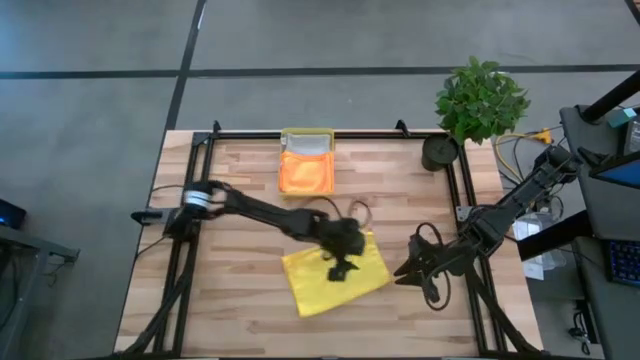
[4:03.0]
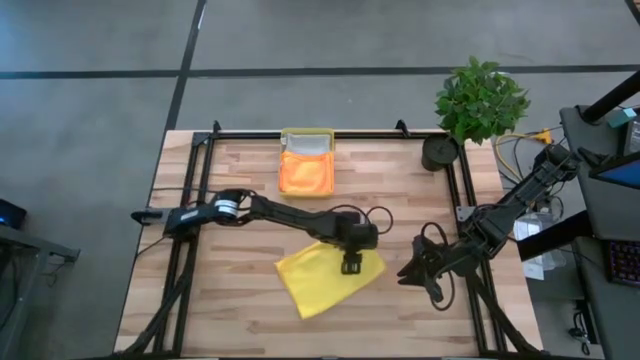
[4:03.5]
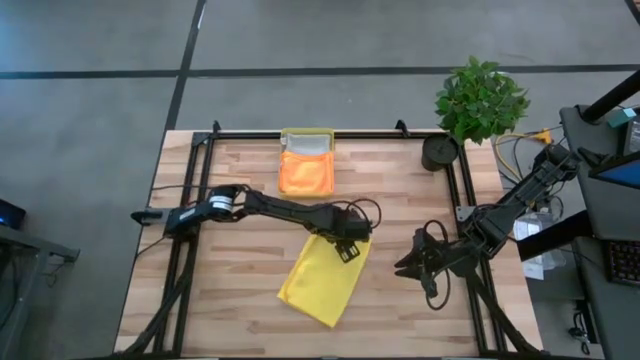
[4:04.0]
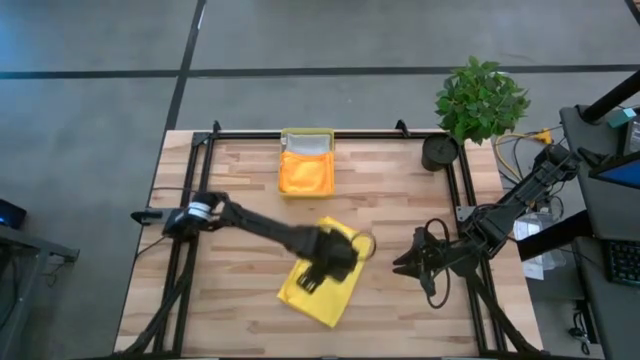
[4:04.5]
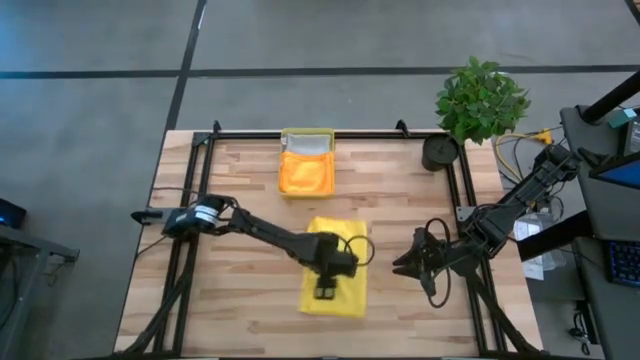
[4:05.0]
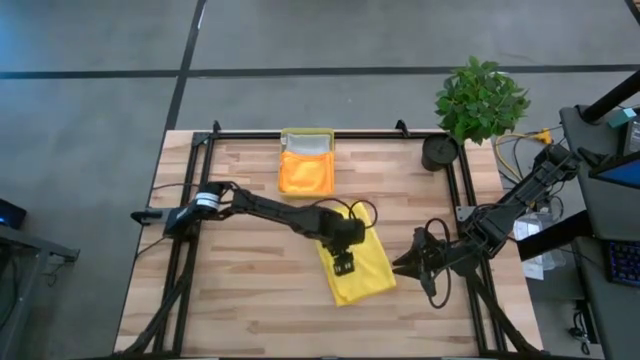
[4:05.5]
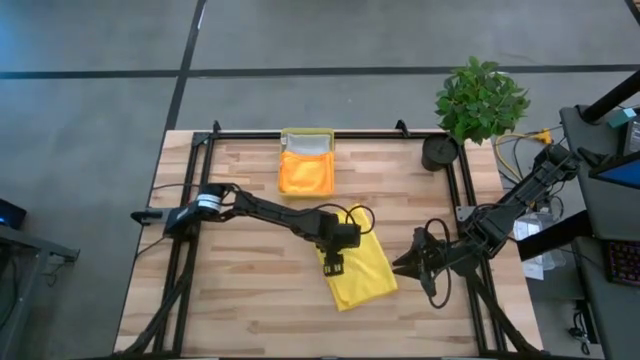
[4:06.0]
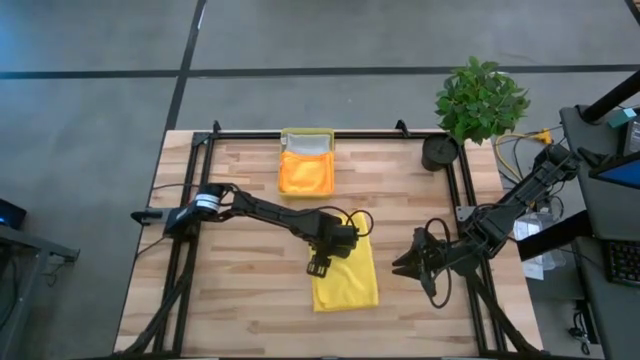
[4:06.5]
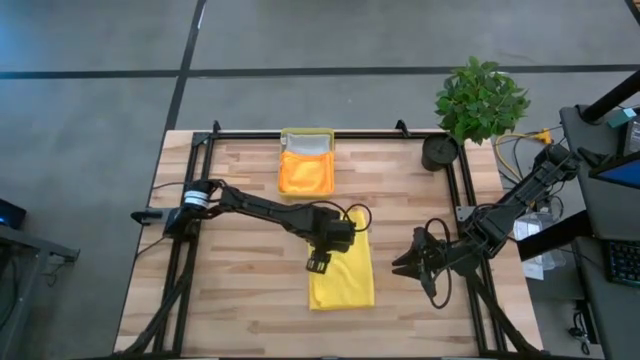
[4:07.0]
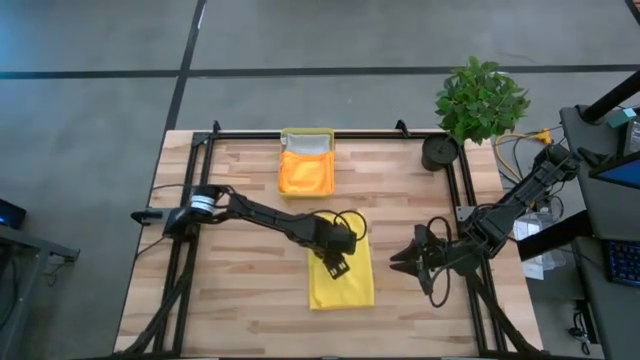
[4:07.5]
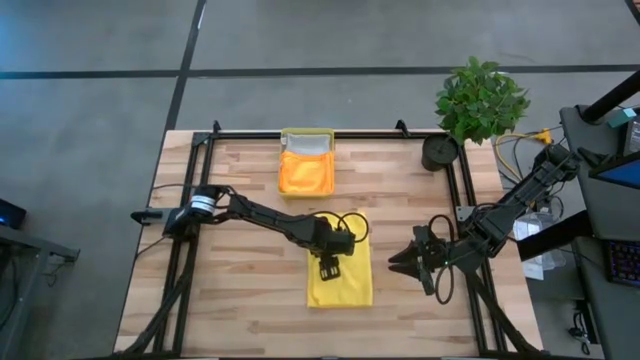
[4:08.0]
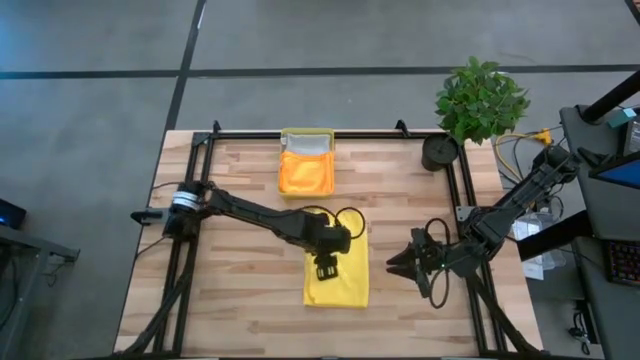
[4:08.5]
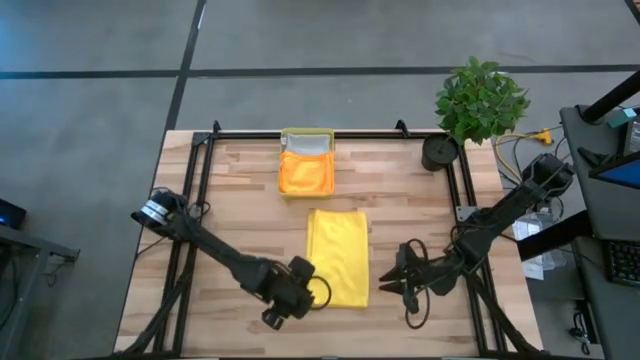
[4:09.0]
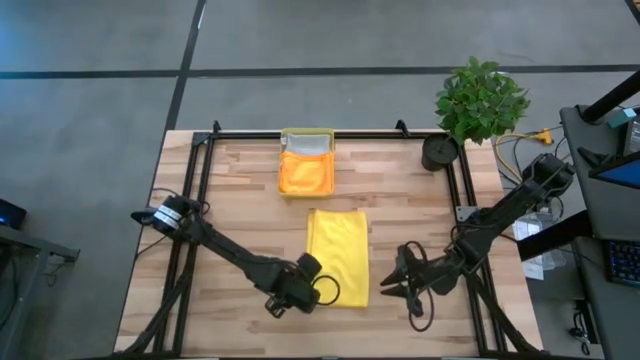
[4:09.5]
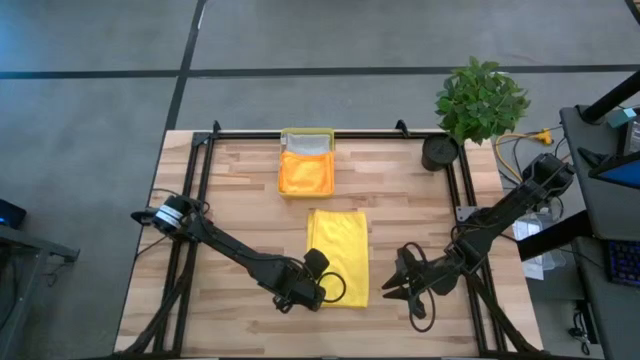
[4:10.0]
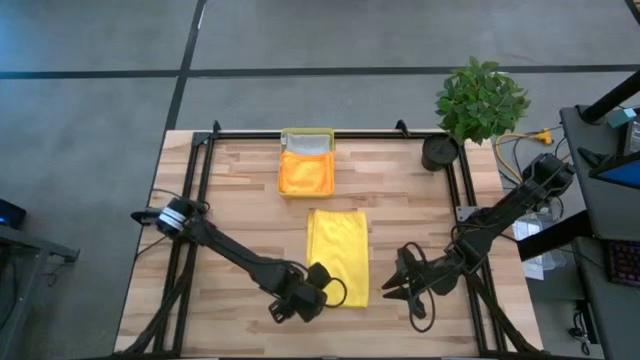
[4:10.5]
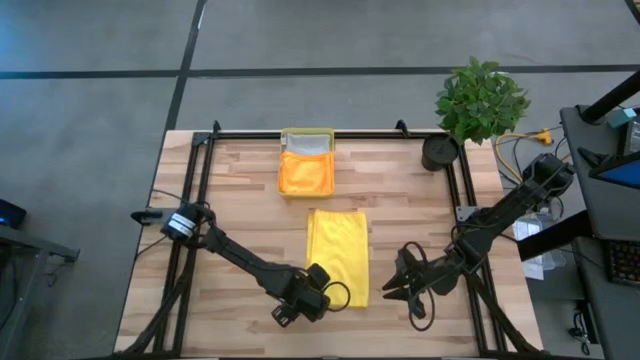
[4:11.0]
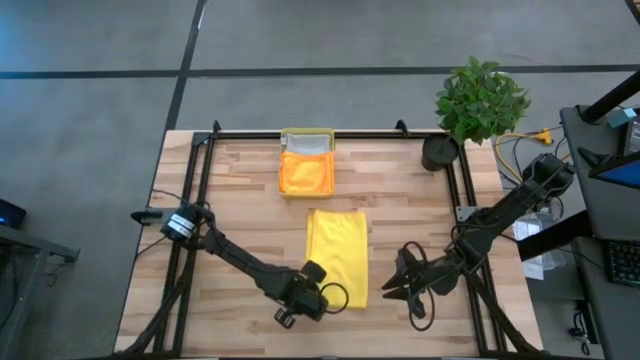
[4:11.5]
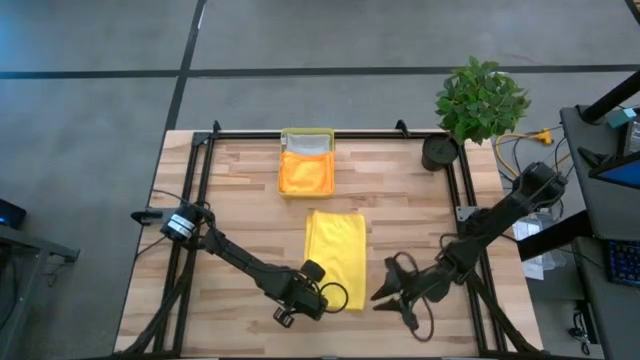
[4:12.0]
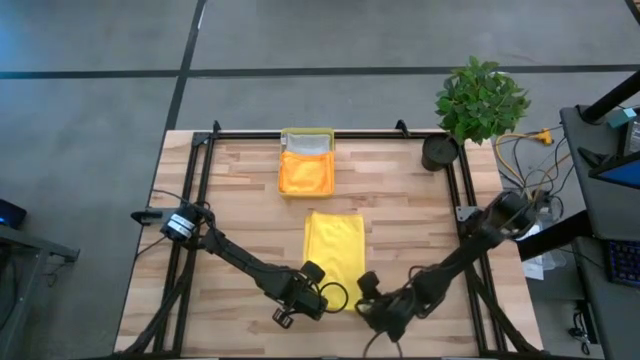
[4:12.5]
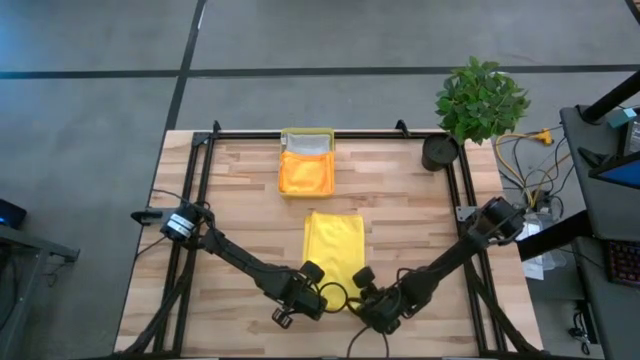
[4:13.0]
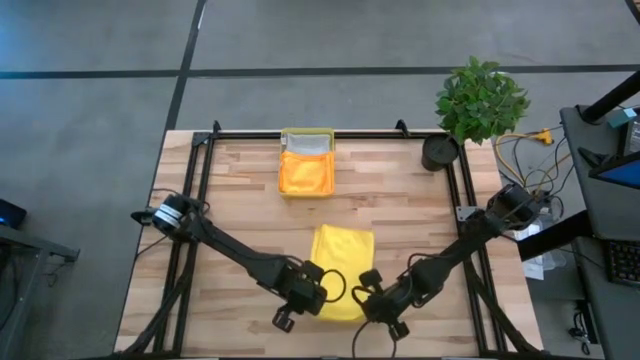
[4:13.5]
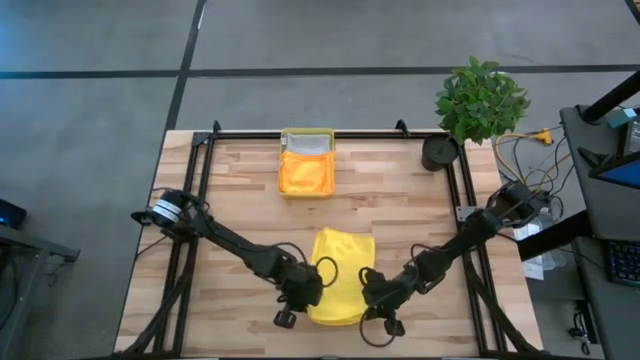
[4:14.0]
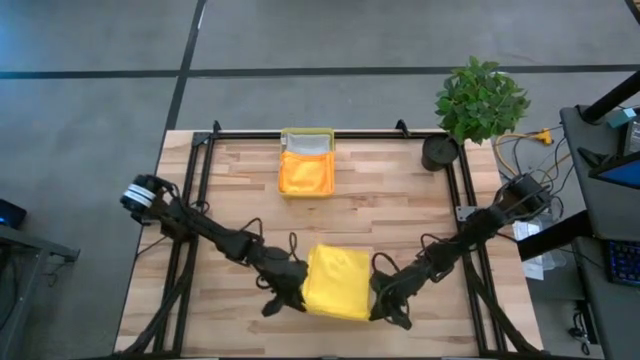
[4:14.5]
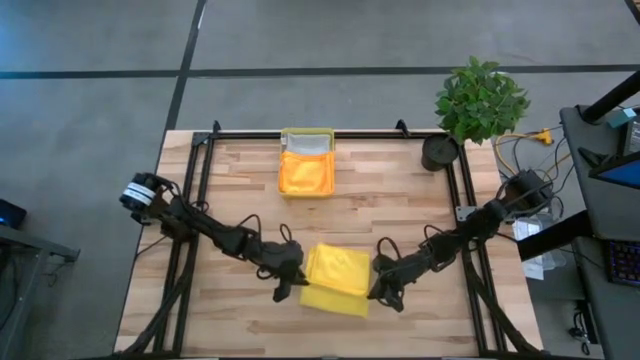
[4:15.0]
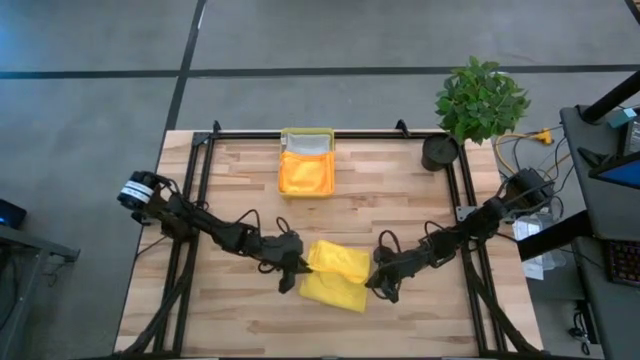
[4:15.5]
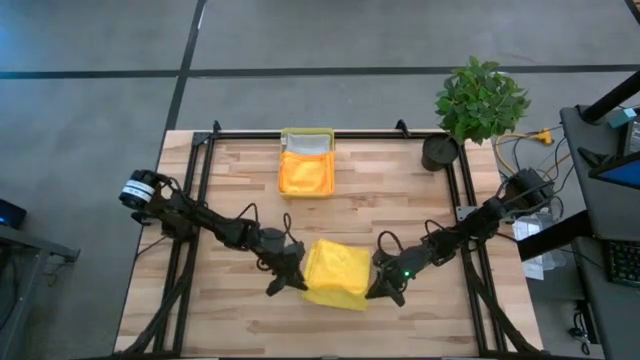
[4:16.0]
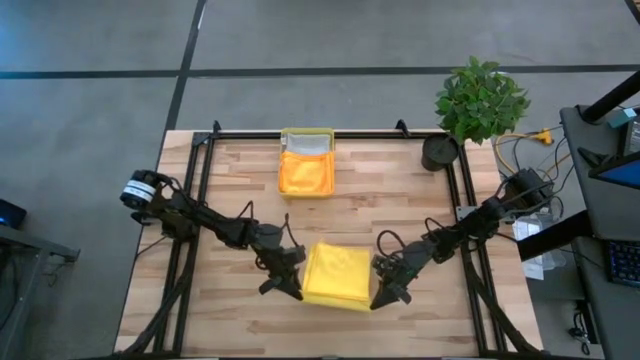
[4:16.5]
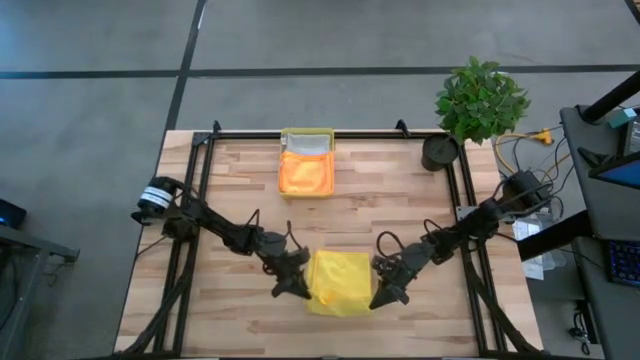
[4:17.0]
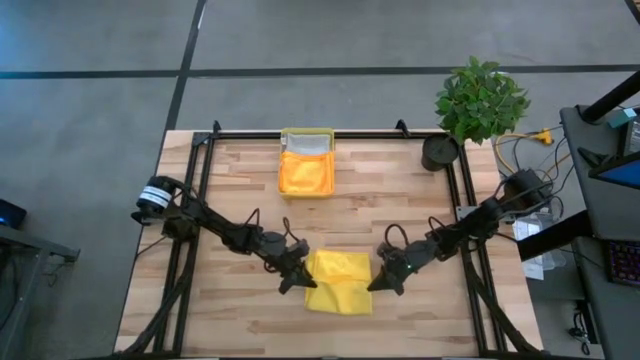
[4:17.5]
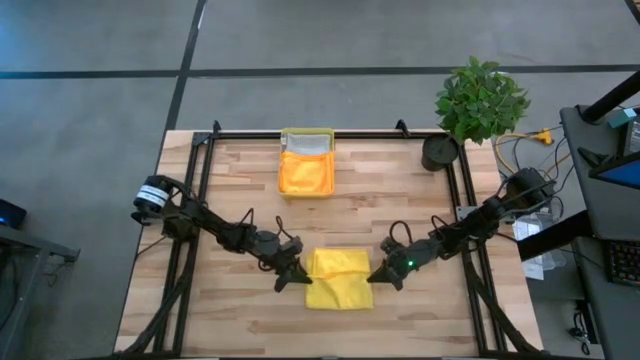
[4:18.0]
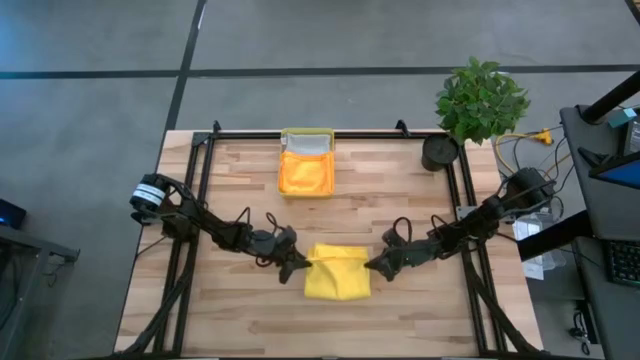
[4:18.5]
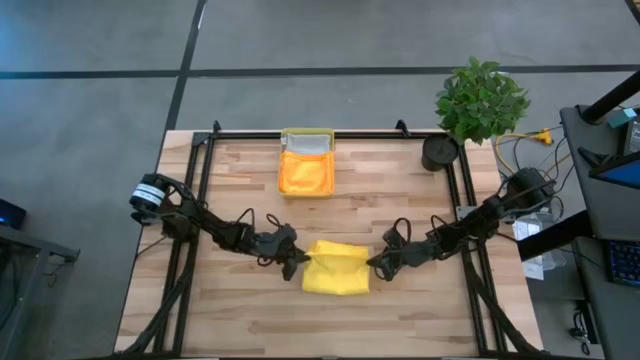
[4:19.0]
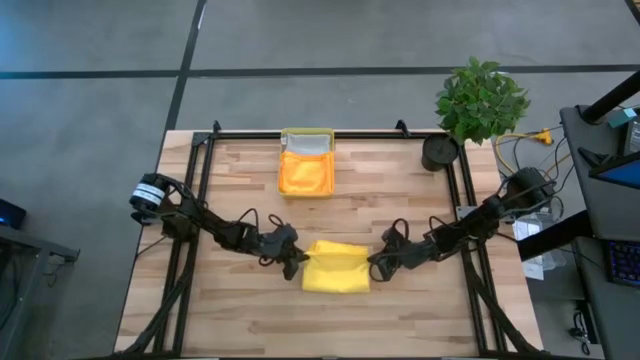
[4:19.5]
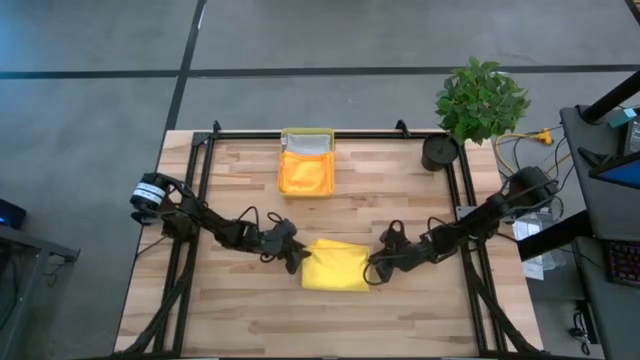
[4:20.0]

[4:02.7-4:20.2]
Task: Fold microfiber towels
Fold the yellow microfiber cloth

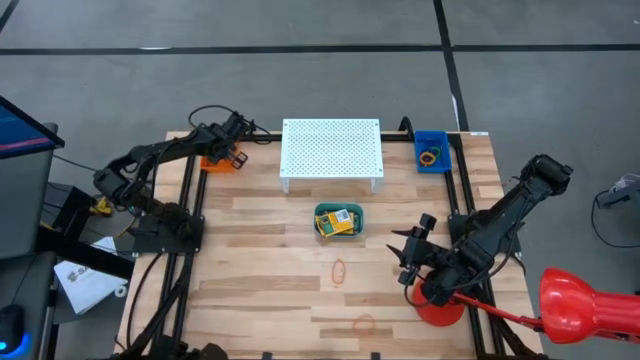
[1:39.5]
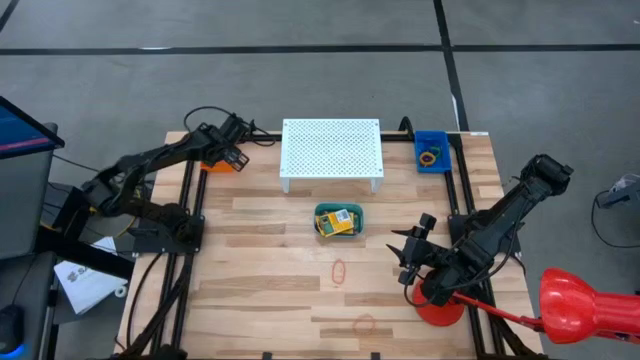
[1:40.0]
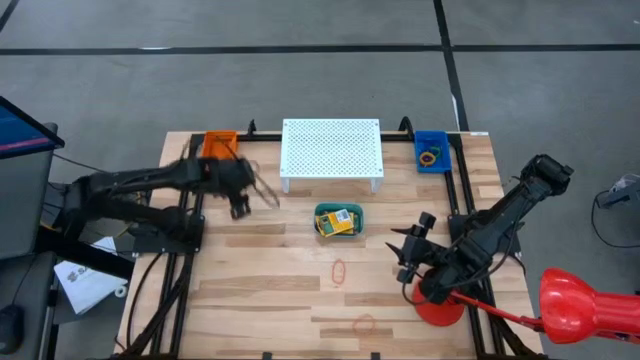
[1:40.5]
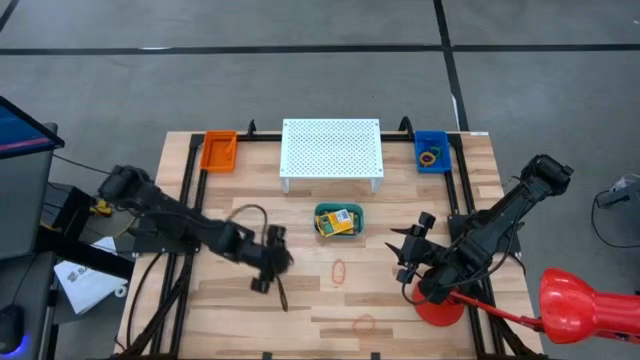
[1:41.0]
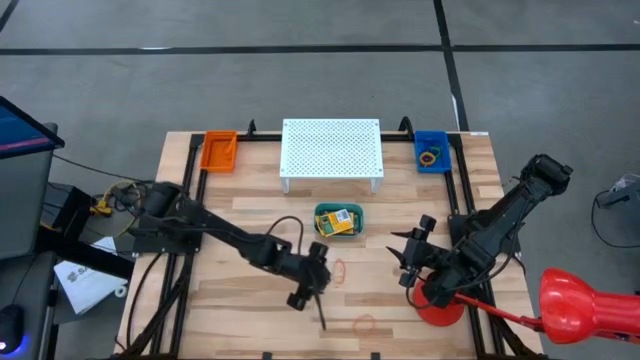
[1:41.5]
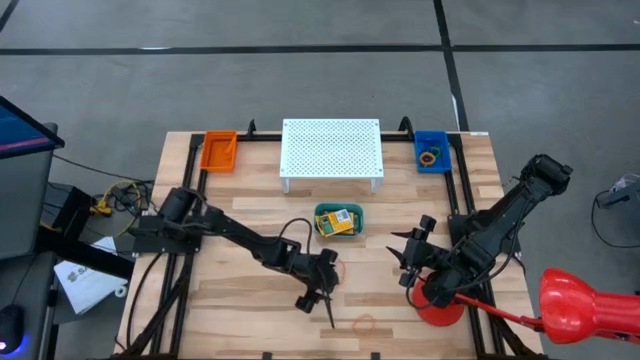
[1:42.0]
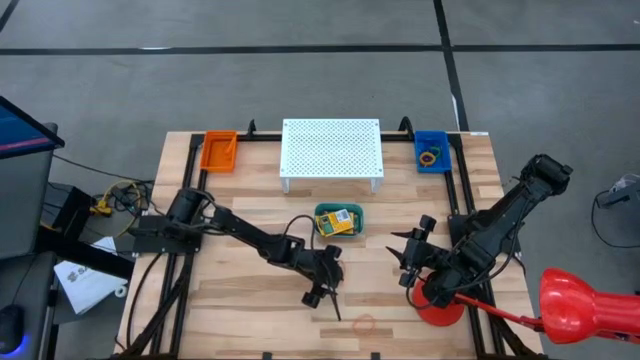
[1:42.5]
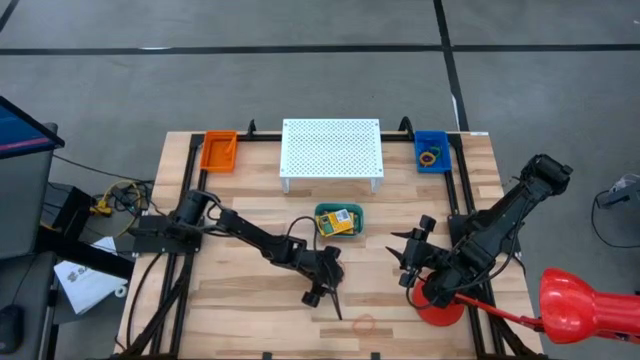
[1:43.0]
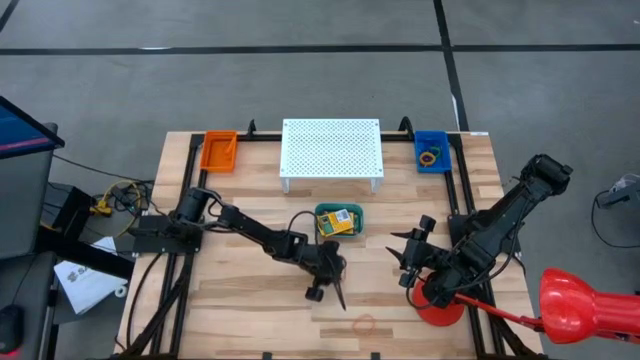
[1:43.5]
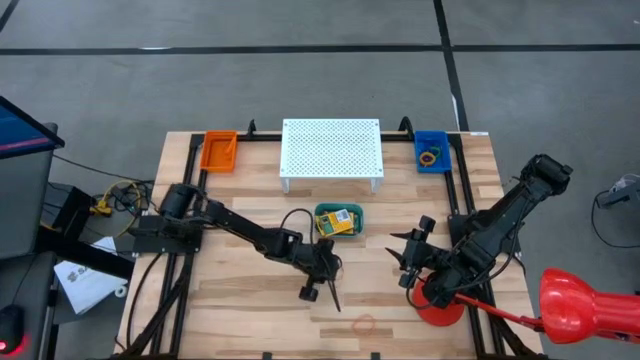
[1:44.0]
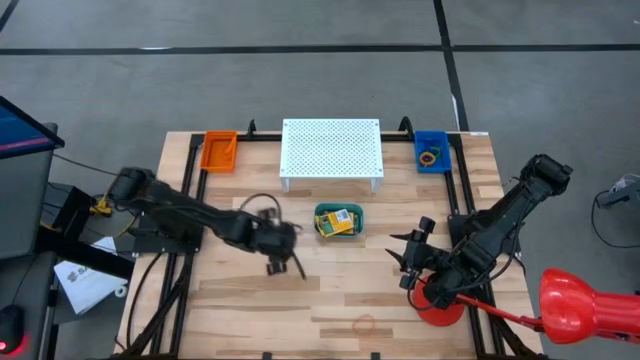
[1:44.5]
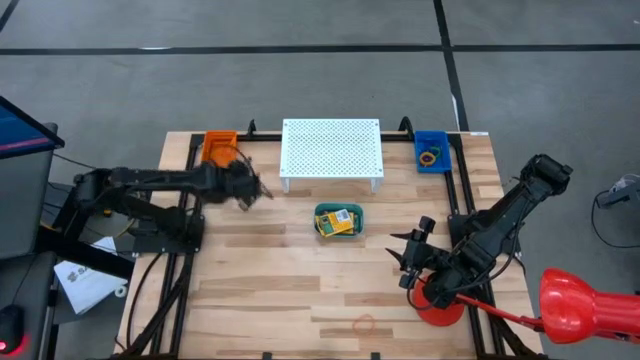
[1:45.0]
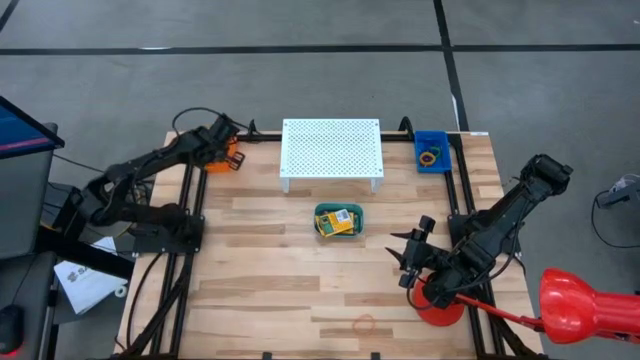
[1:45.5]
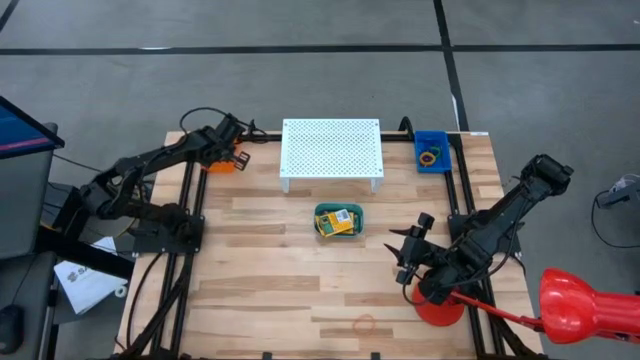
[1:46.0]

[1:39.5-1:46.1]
Task: Pick & Place Office Desk Supplies
Put the orange rubber band into the orange bin
